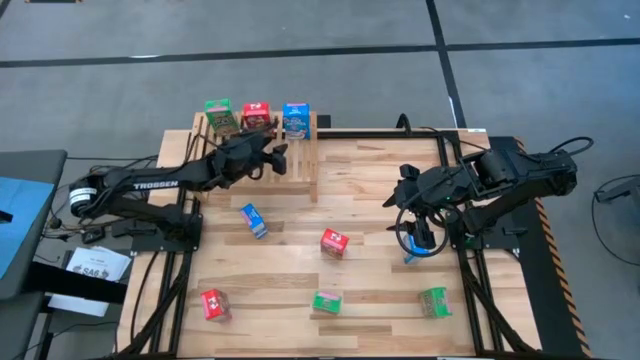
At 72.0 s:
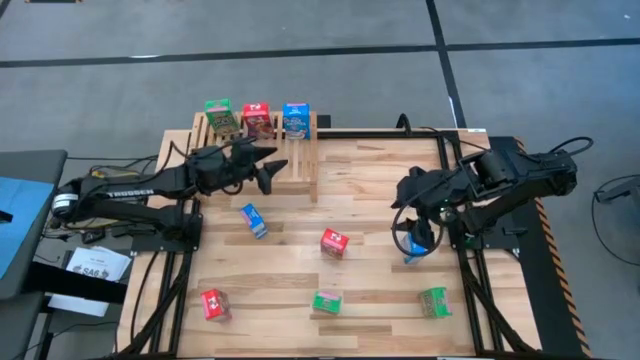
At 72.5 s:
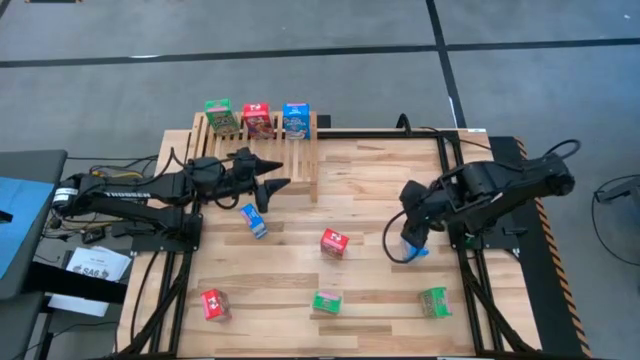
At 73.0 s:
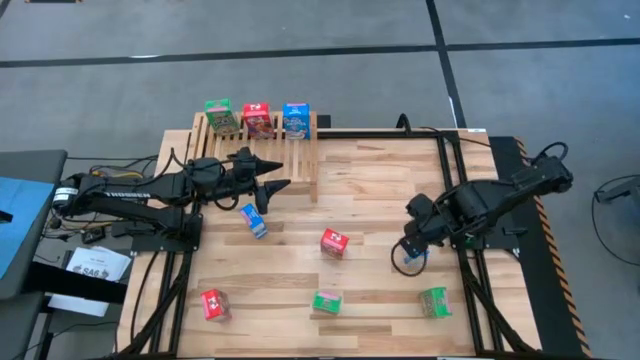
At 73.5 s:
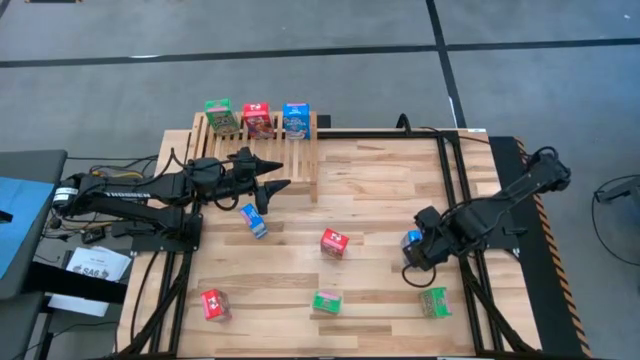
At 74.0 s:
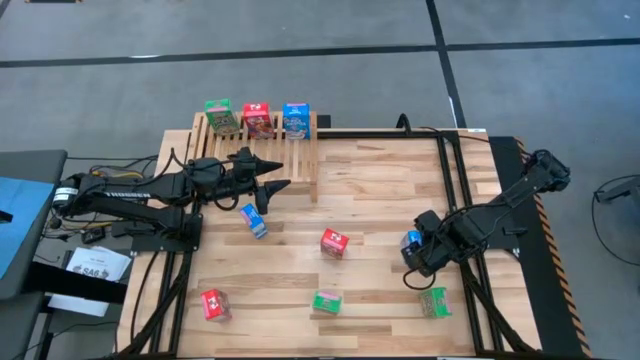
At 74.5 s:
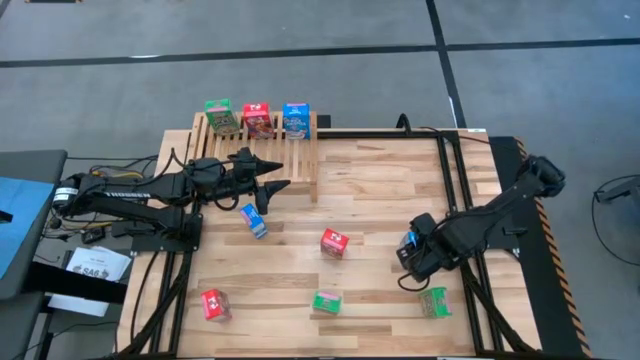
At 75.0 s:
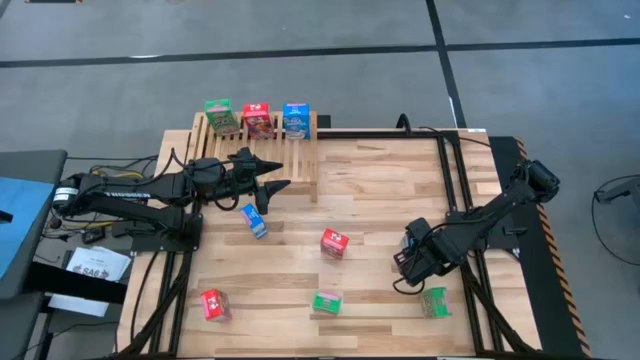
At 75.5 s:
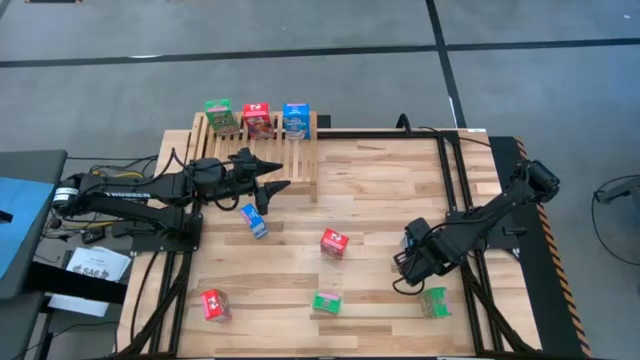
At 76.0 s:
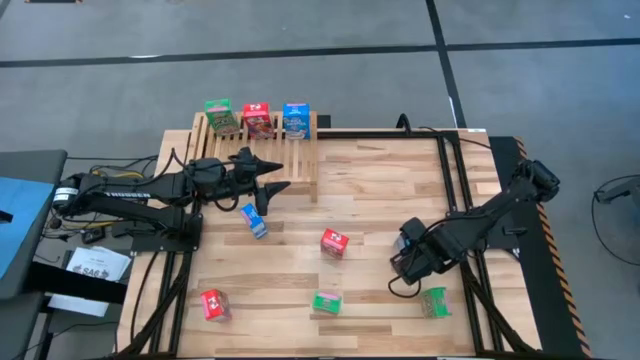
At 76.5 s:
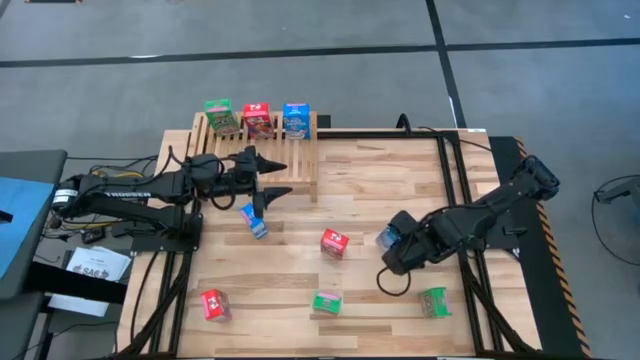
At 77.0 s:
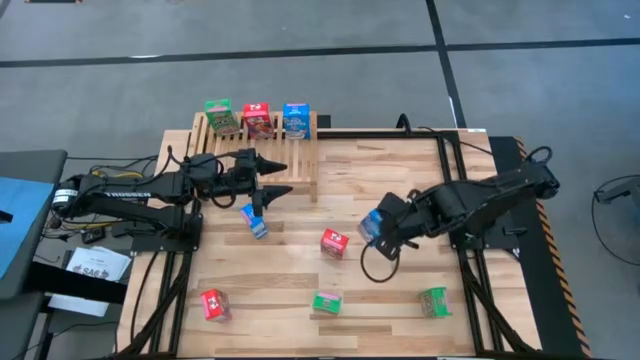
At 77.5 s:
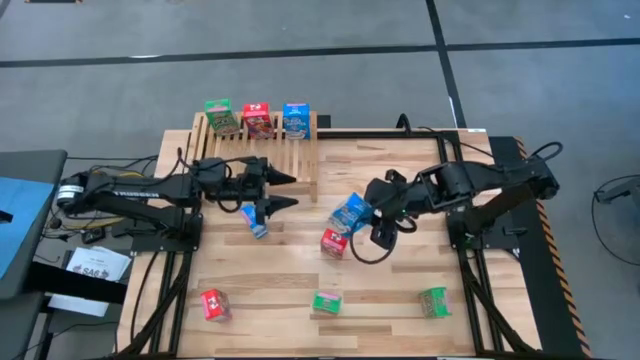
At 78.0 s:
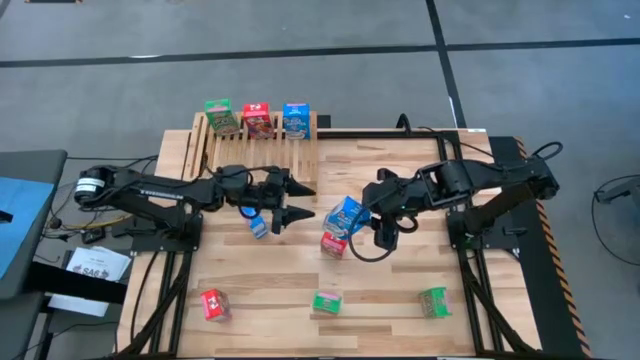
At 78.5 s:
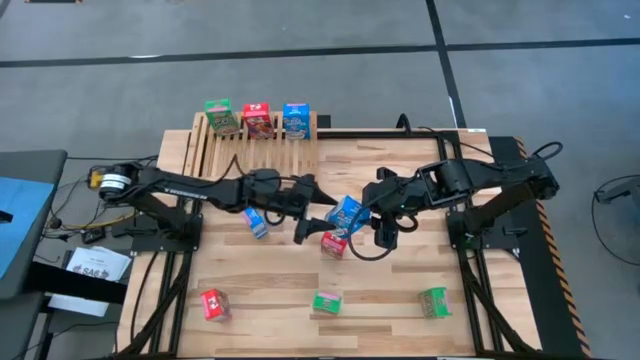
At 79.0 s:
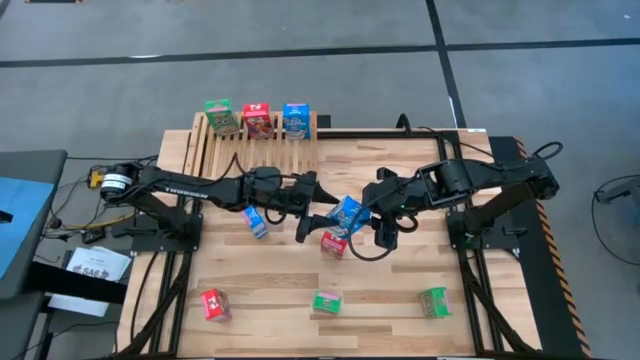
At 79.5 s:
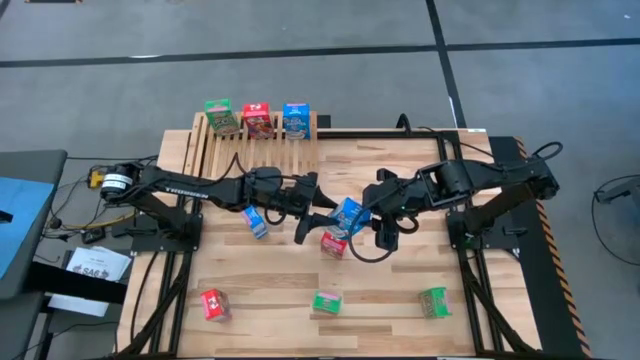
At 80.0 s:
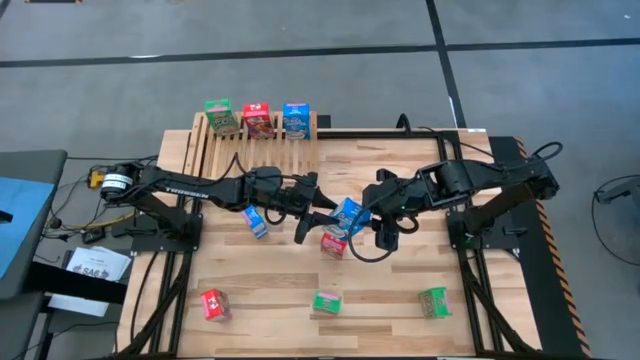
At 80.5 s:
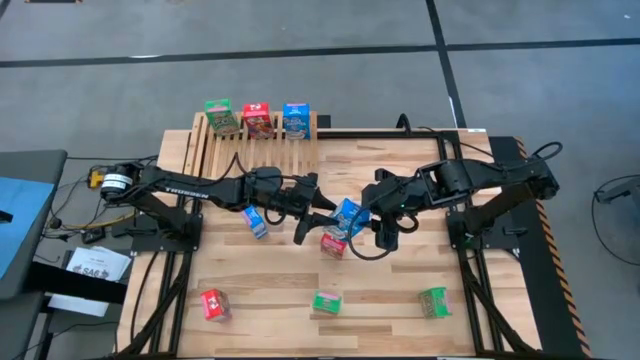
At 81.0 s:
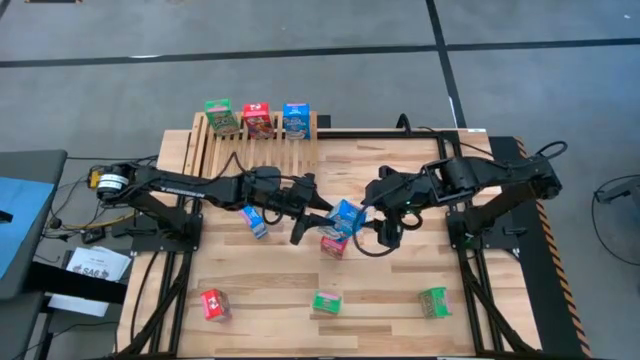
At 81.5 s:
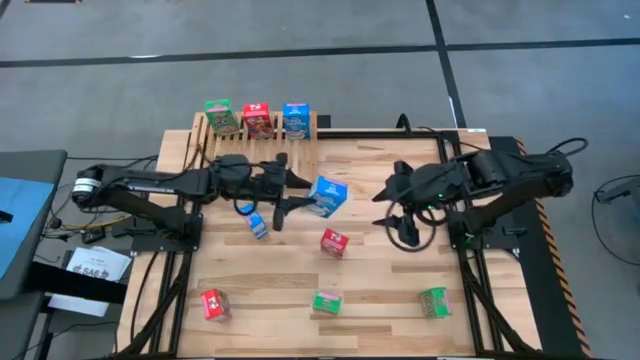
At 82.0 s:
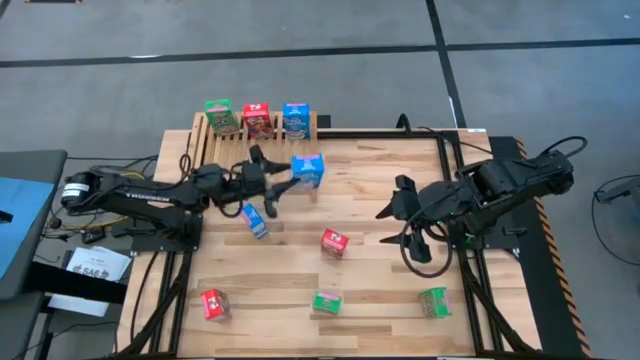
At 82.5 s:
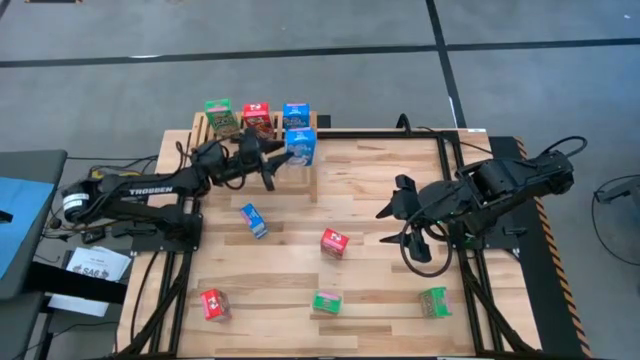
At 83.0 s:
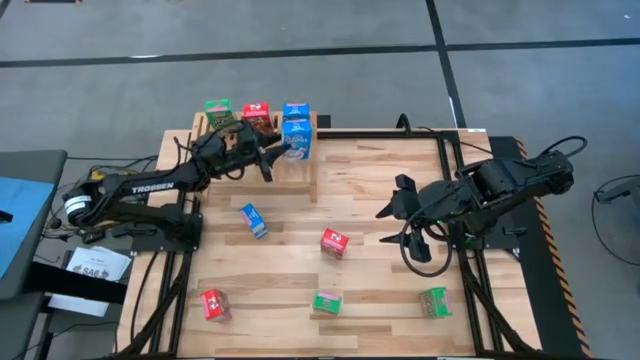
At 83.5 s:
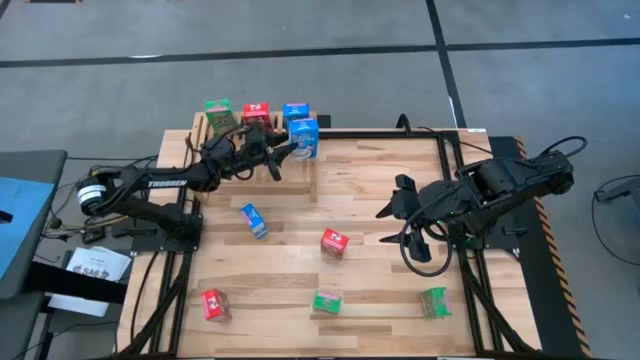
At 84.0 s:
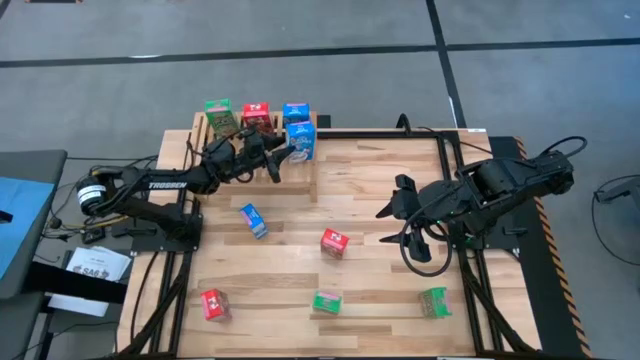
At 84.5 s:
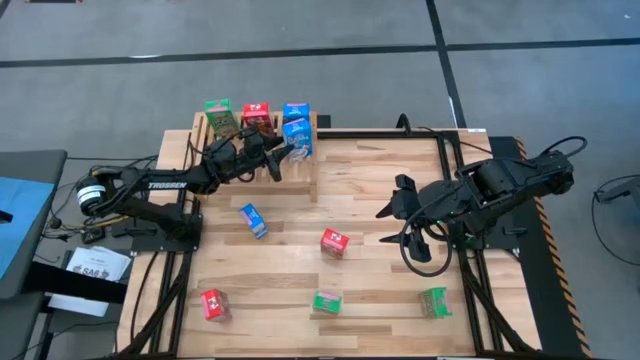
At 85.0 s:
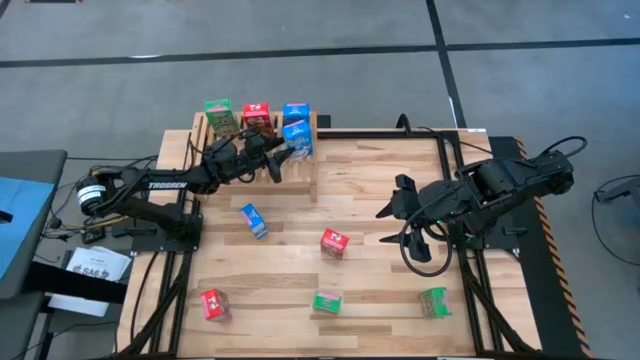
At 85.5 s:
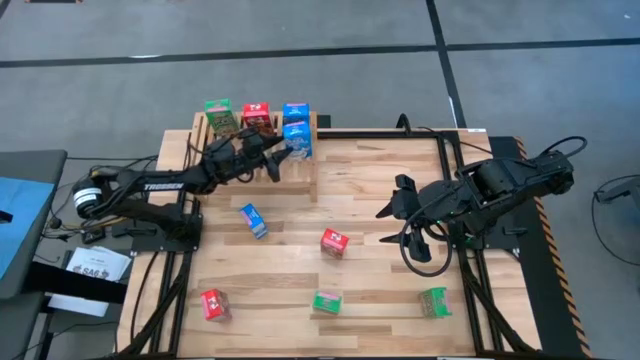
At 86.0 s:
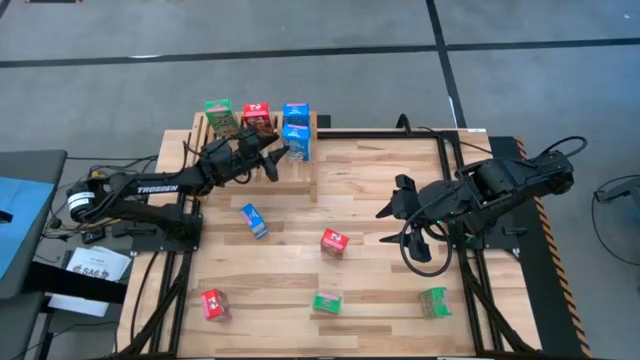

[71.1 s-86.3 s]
Task: Stack cereal on shelf
Put the right blue cereal box on the shelf aligned with the other blue cereal box

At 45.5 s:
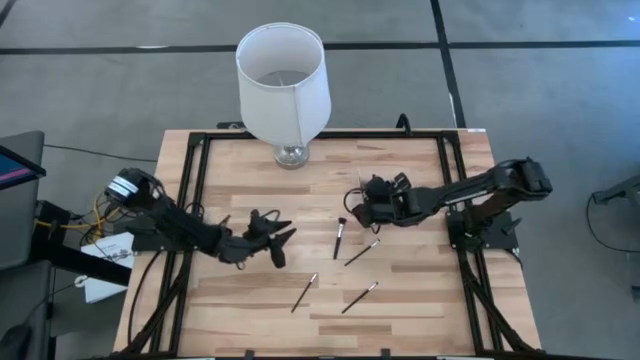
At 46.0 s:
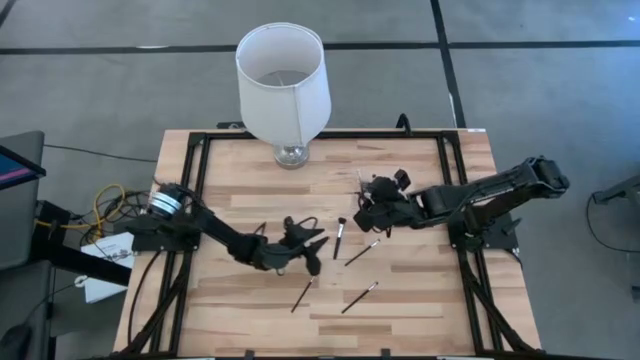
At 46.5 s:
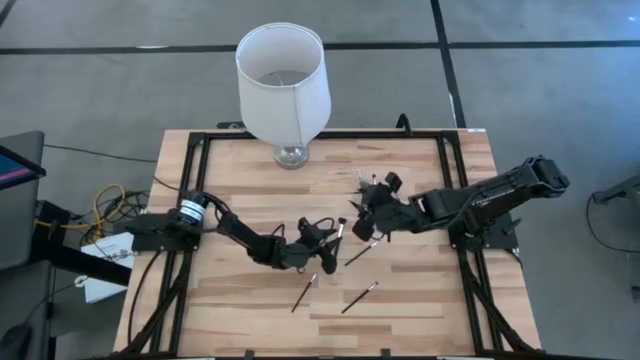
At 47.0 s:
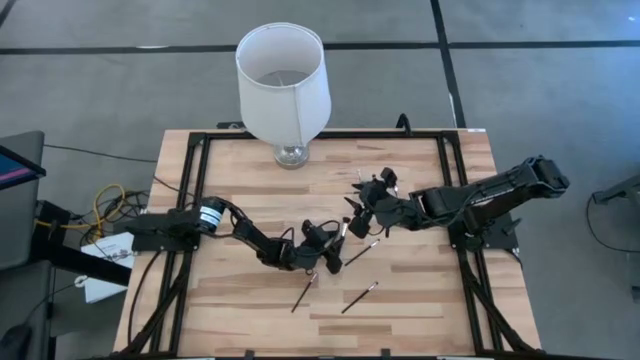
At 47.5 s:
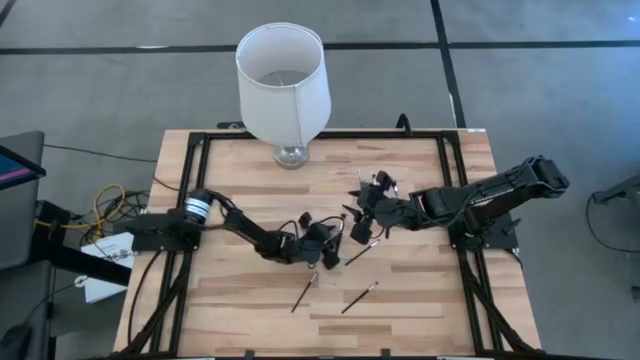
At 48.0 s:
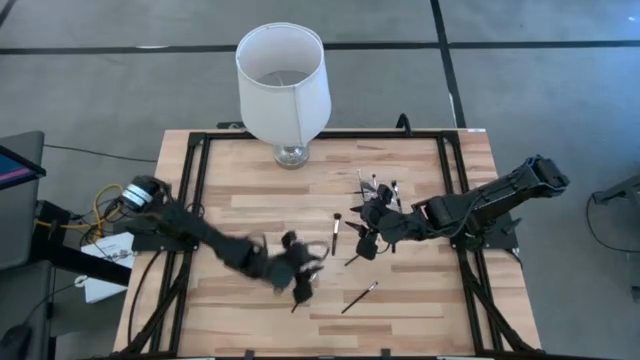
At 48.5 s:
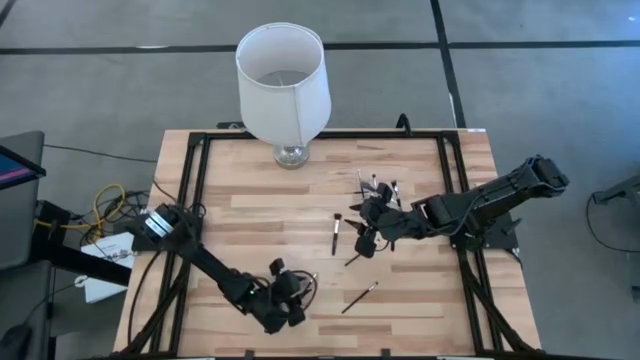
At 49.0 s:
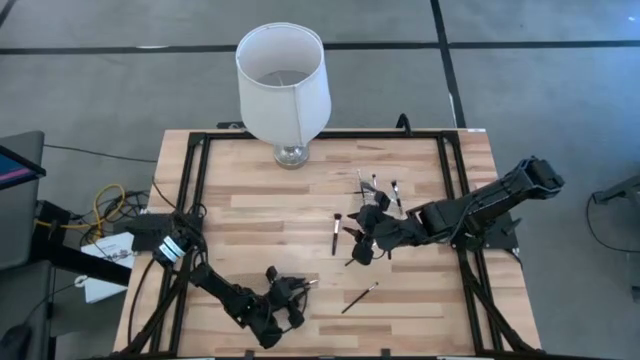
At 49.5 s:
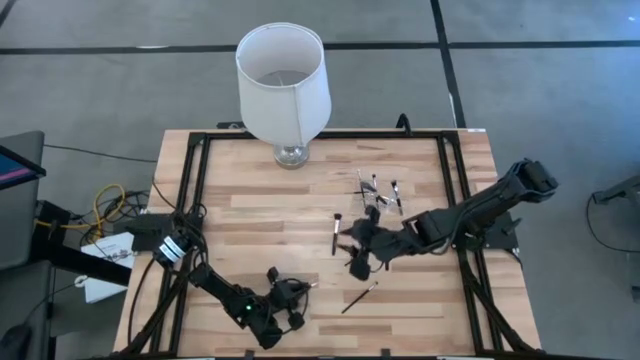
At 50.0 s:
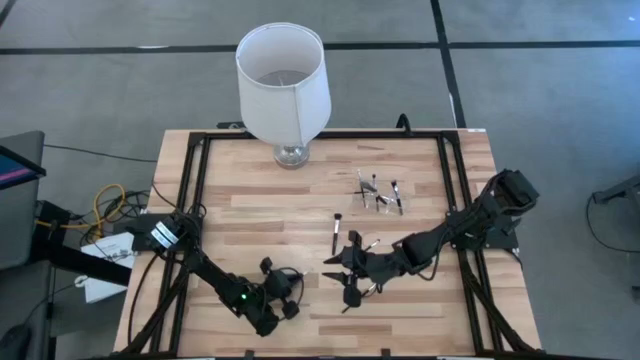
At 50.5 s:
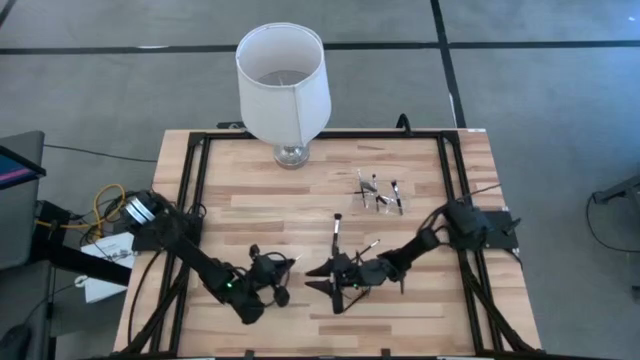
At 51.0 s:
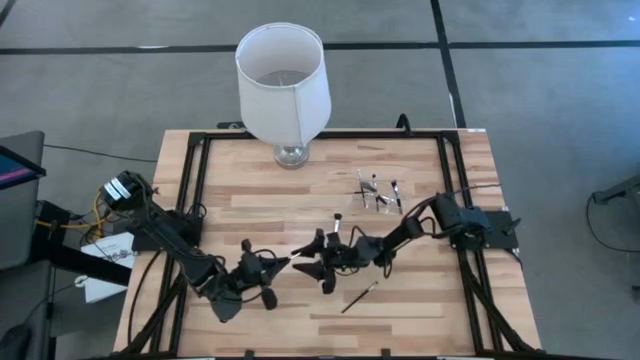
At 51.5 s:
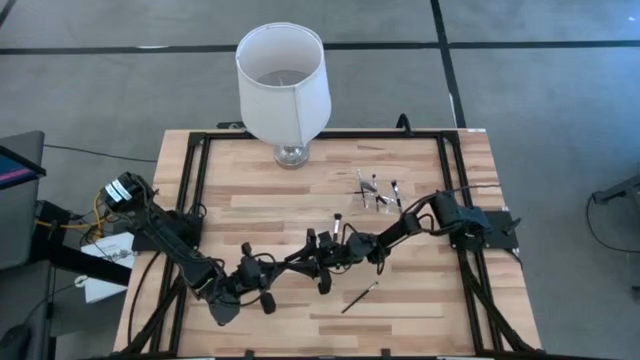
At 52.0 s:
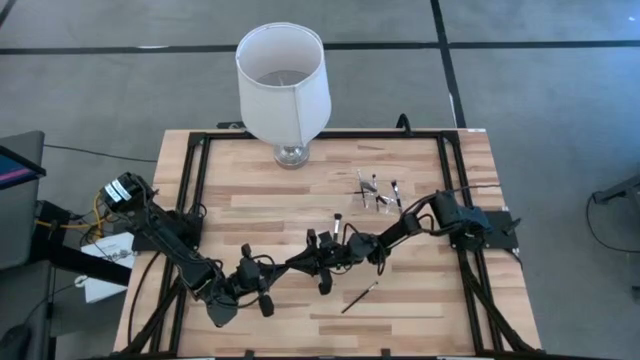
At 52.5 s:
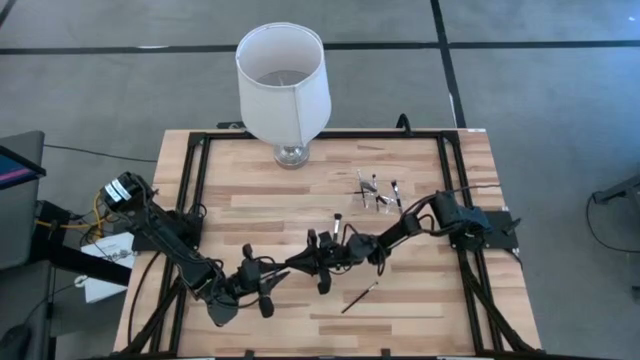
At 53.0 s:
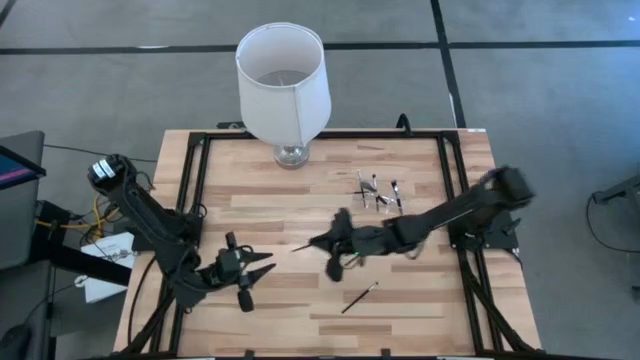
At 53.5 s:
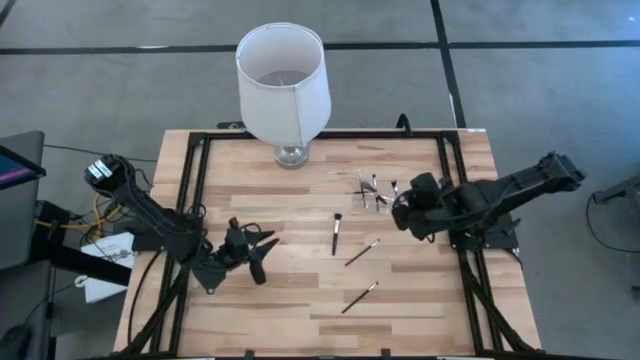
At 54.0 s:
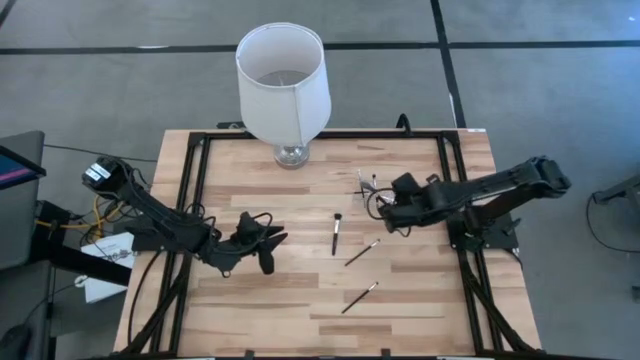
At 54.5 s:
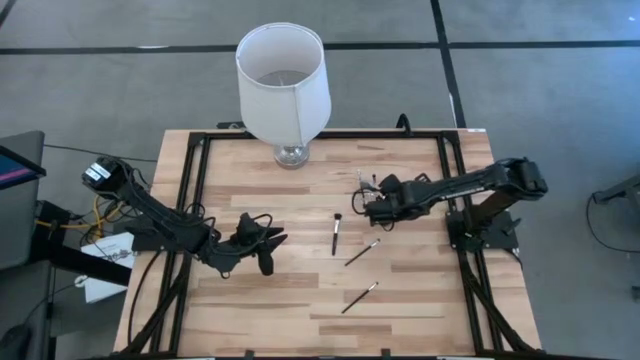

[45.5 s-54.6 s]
Task: Pick & Place Makeup Supplies
Put the black makeup brush into the transparent organizer
